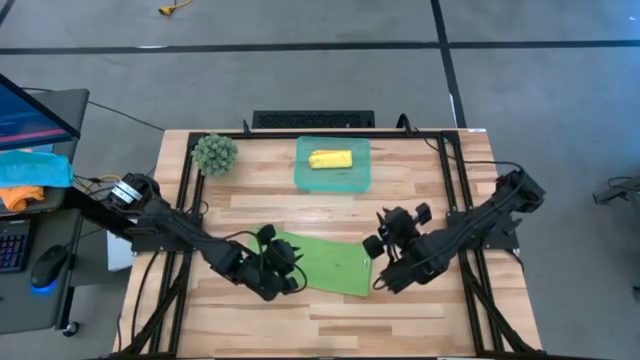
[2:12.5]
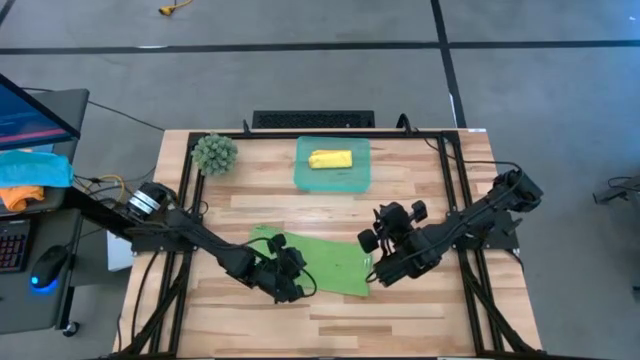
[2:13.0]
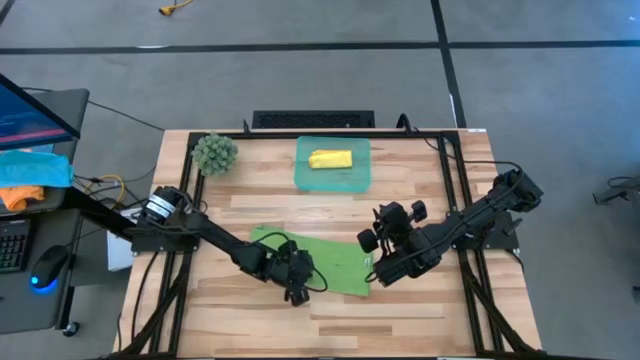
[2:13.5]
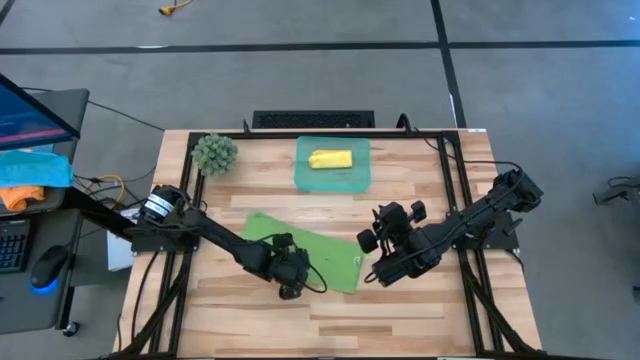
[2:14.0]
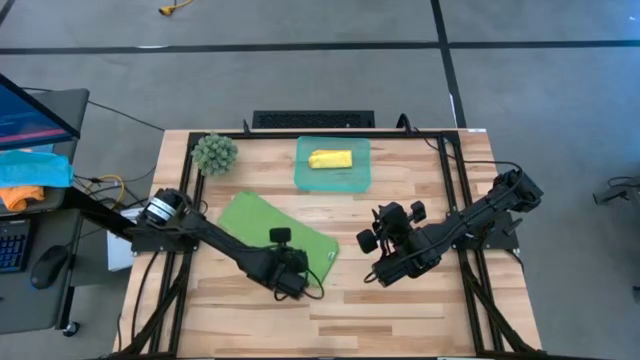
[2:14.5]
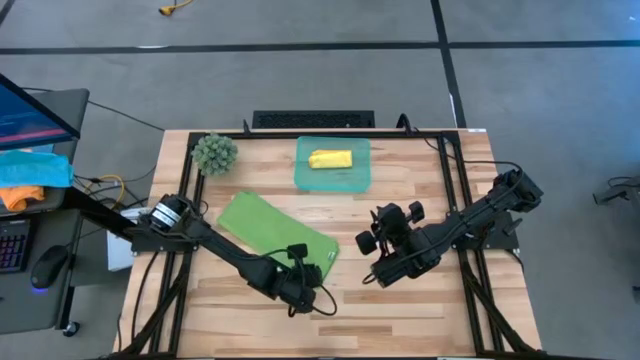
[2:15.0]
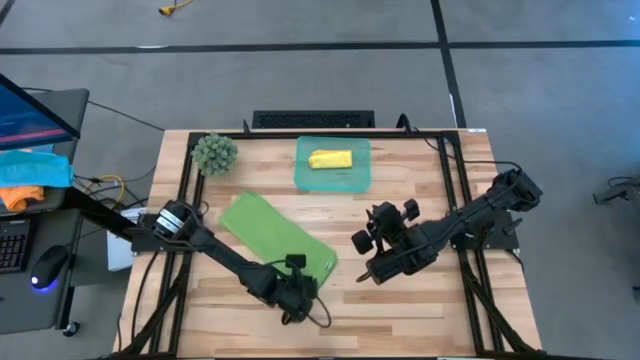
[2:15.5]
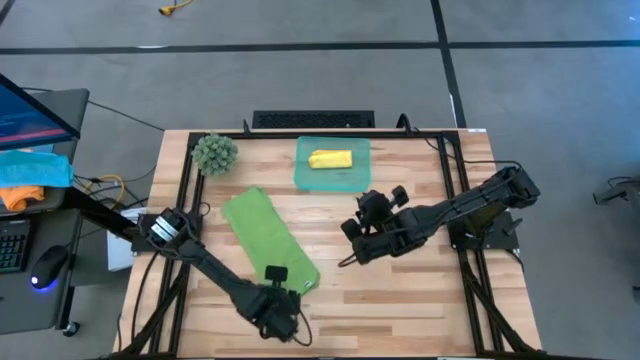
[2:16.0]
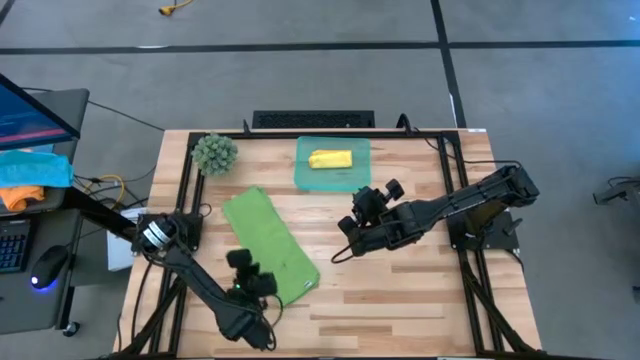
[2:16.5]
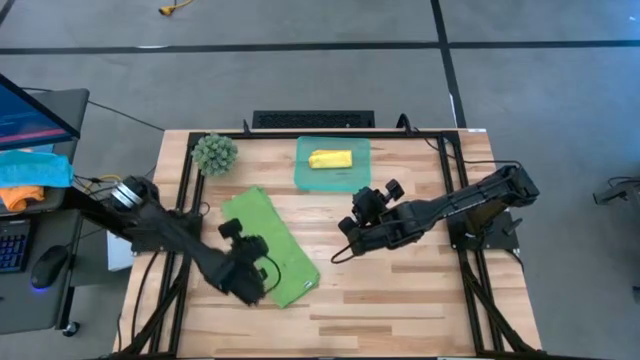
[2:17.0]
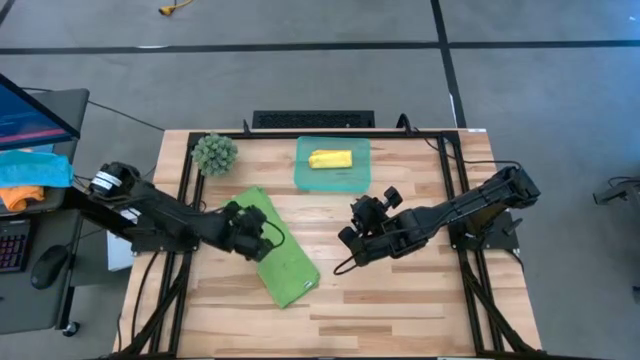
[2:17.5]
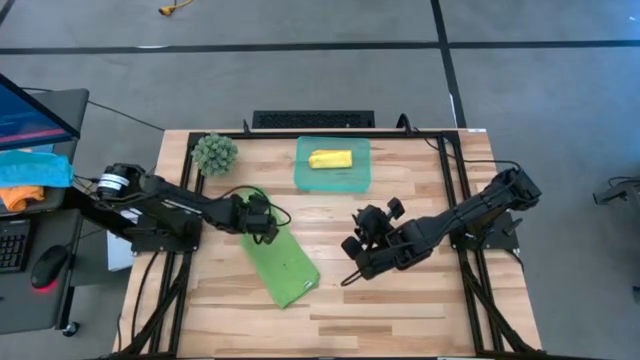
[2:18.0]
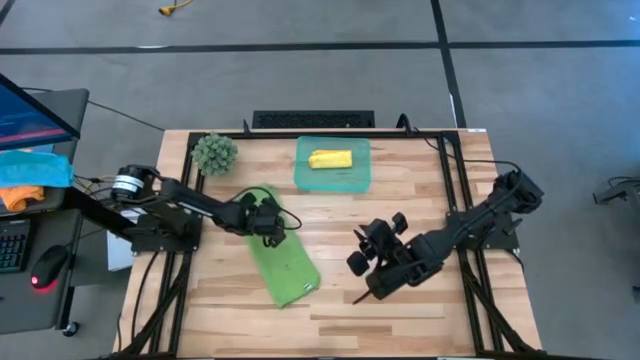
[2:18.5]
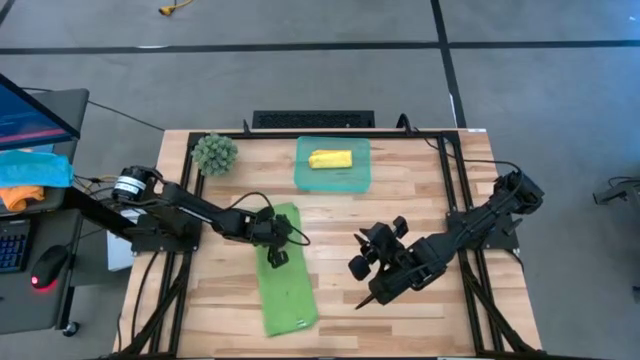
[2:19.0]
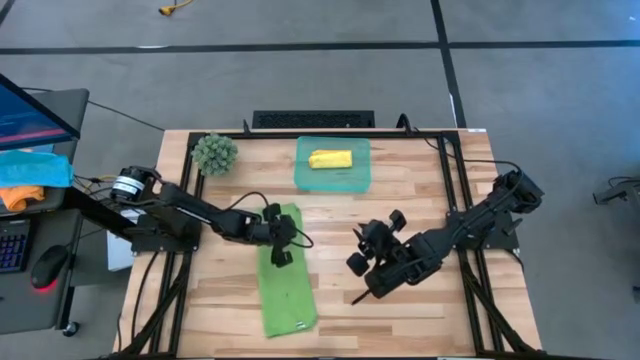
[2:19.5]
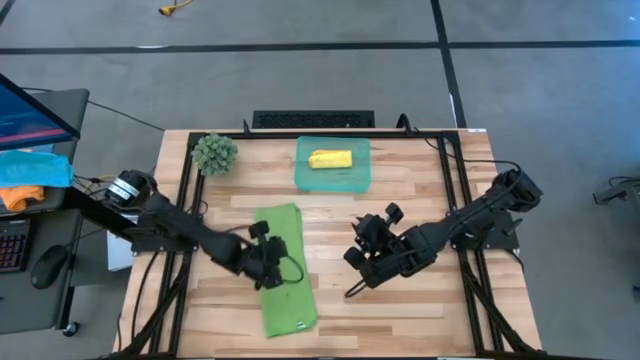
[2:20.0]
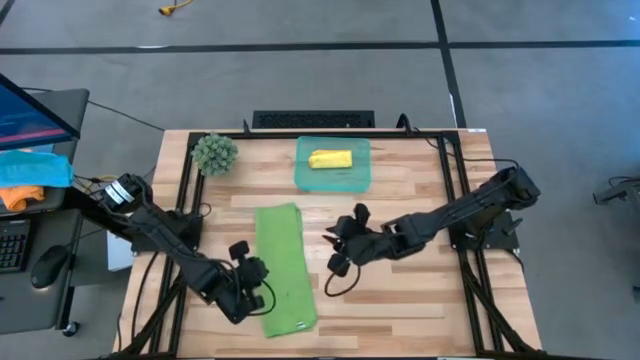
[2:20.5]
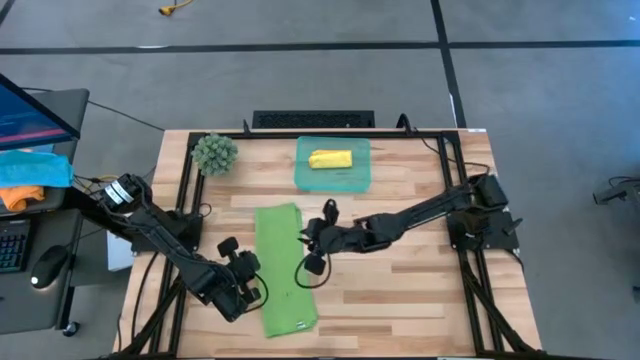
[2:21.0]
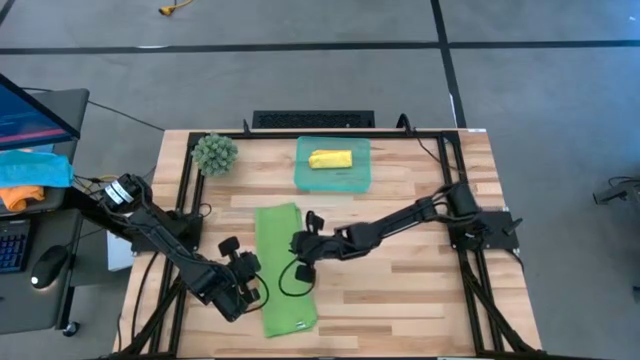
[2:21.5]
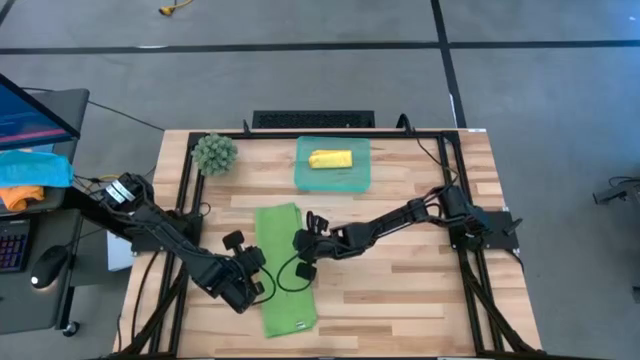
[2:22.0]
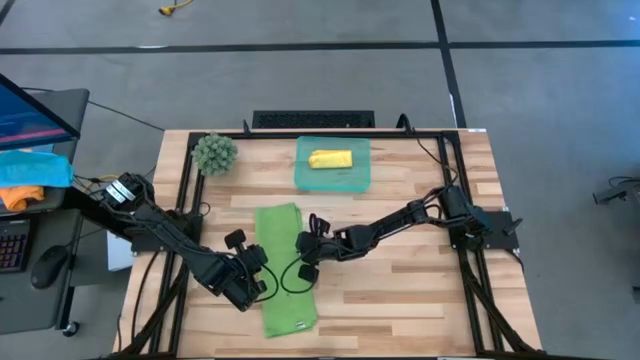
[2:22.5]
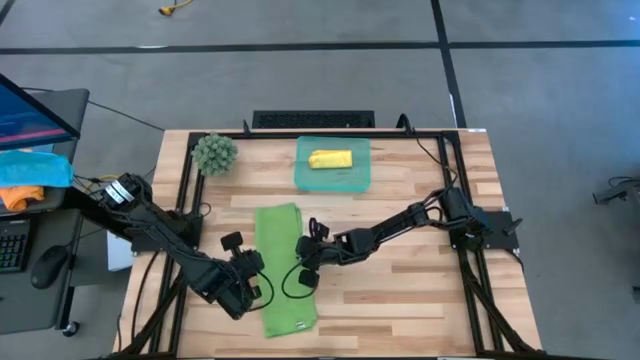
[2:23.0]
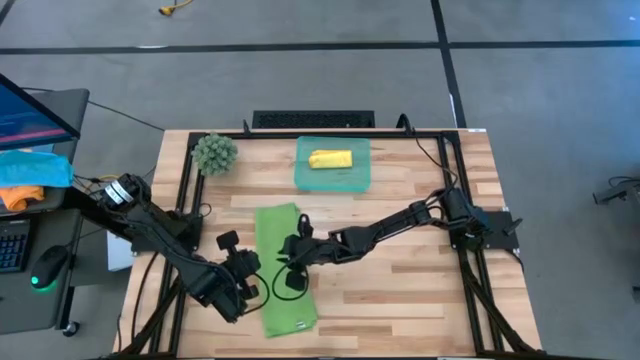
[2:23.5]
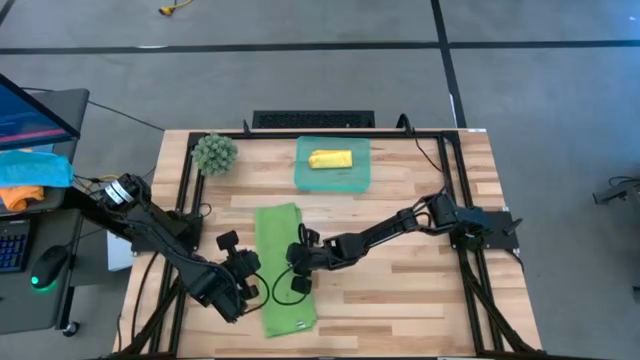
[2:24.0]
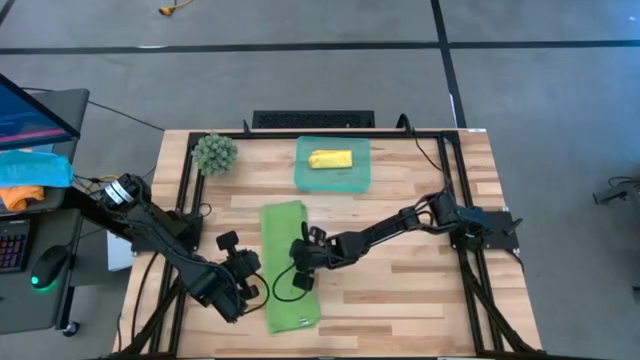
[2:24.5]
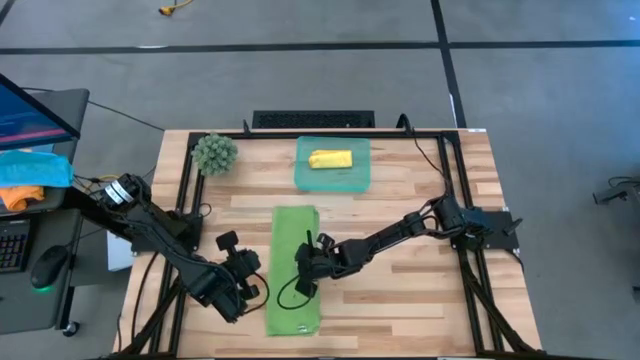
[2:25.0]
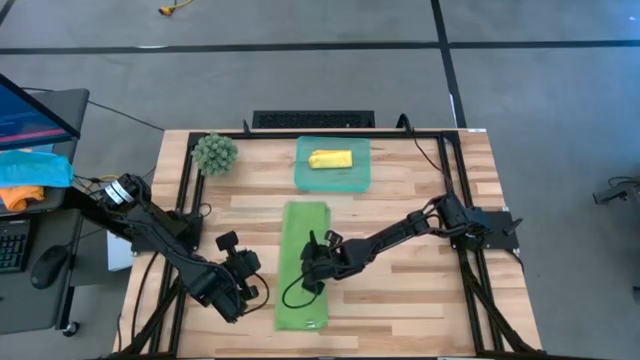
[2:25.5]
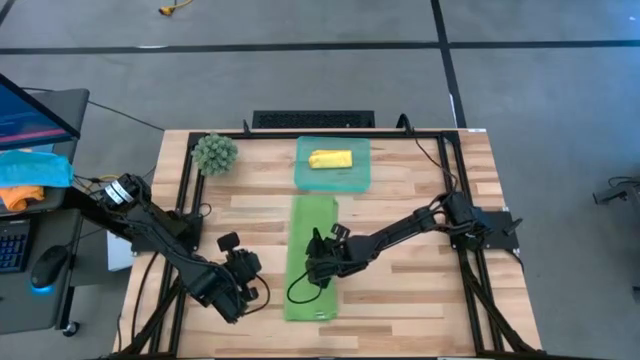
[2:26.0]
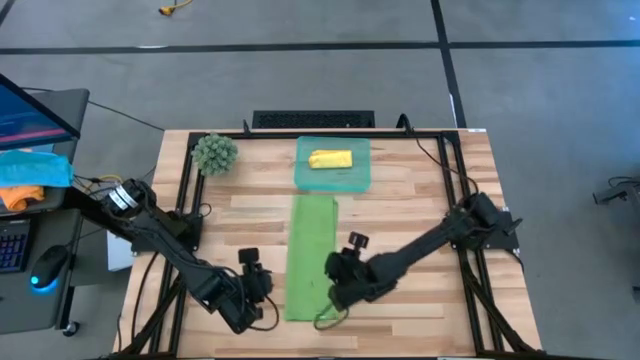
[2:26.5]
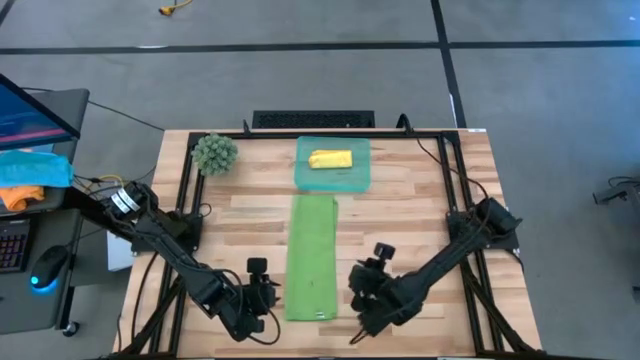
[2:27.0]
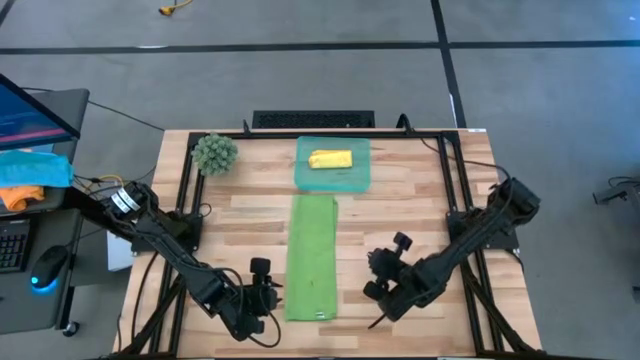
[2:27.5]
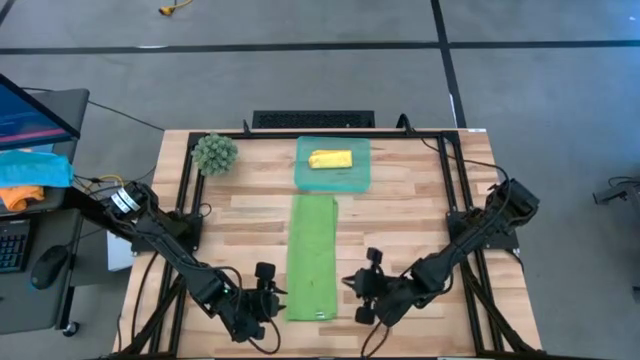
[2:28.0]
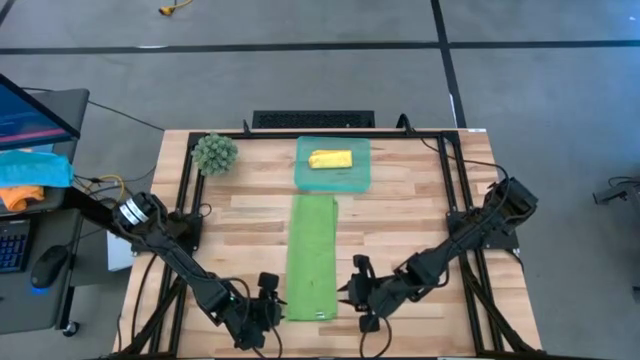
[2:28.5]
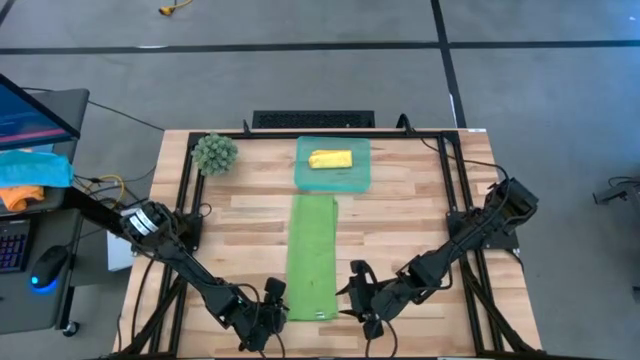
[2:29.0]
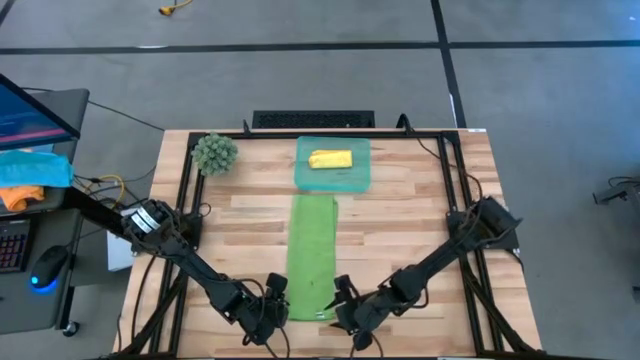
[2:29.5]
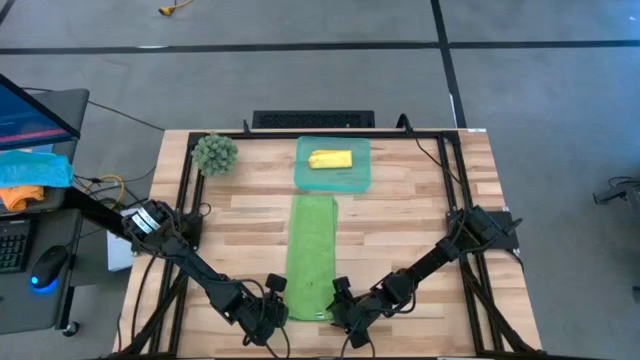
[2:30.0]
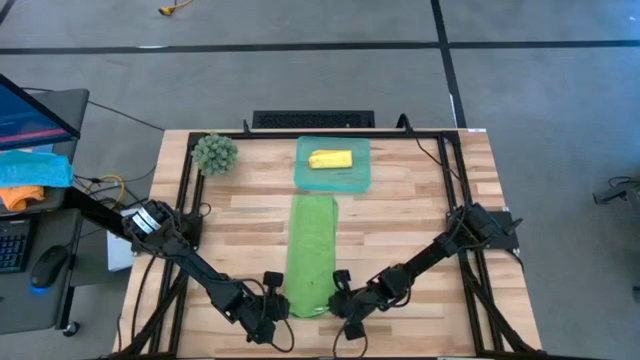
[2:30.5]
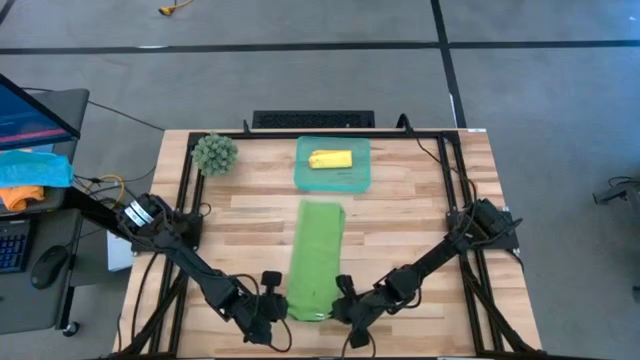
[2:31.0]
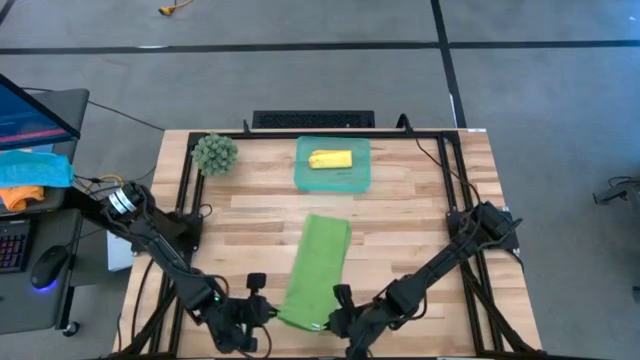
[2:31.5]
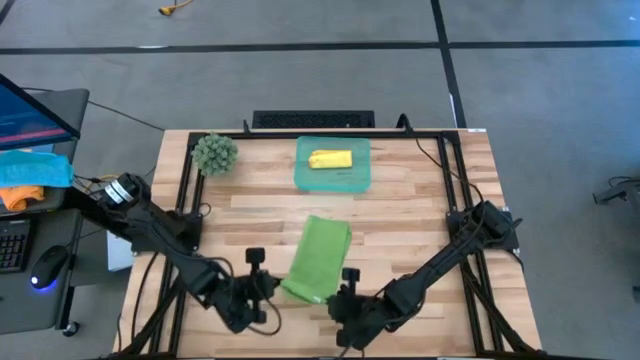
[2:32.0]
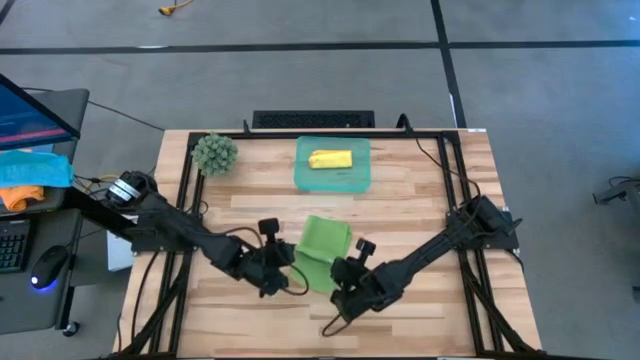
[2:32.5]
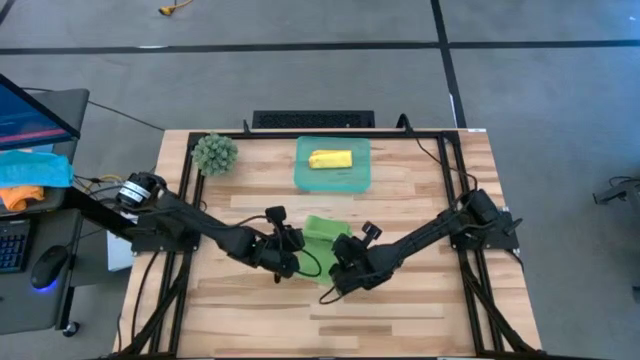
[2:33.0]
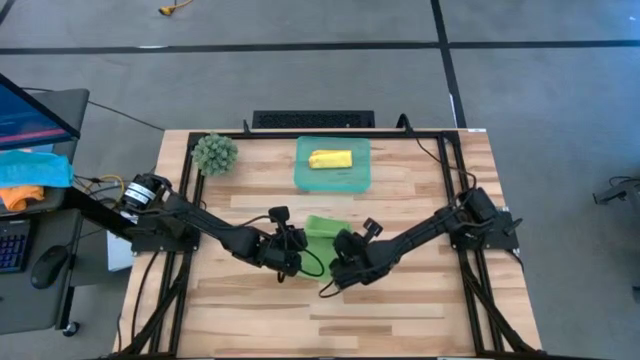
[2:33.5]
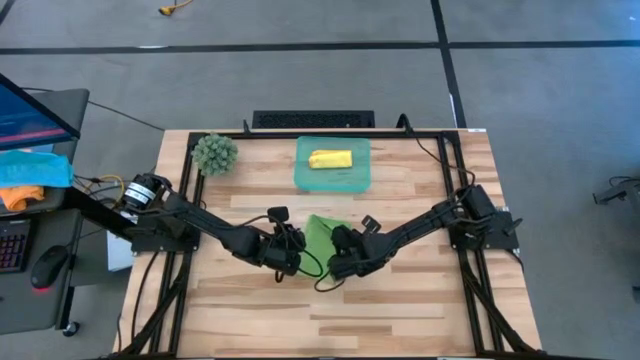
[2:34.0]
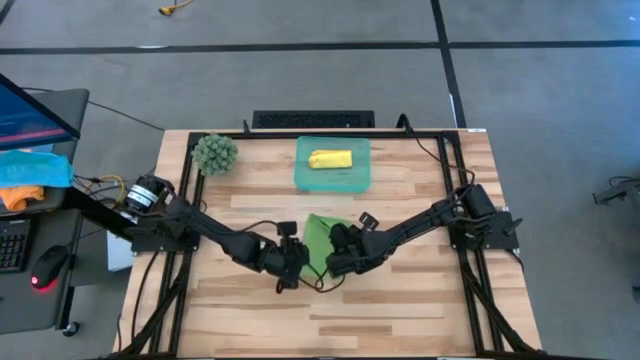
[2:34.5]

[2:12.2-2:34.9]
Task: Roll microfiber towels into tight, uniform cylinder then place into a basket
Fold the green microfiber cloth
